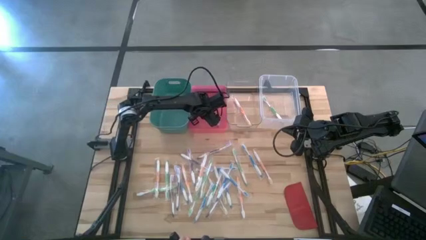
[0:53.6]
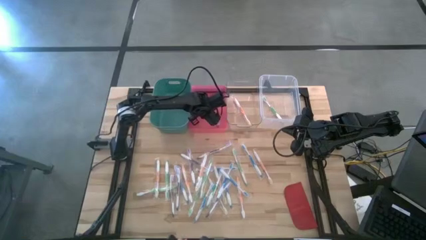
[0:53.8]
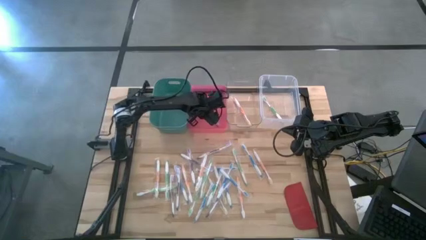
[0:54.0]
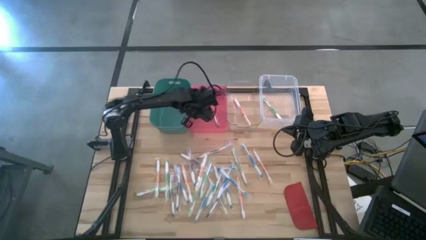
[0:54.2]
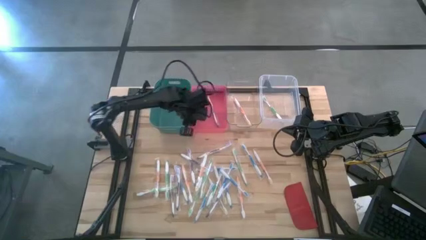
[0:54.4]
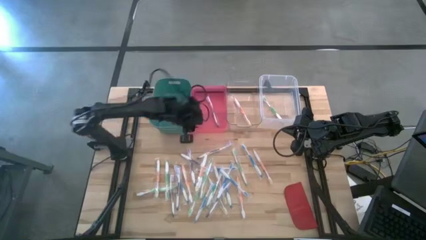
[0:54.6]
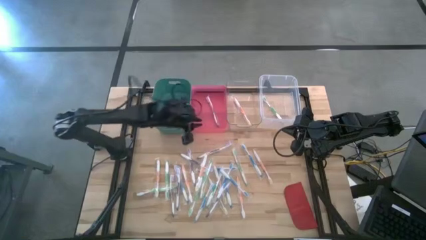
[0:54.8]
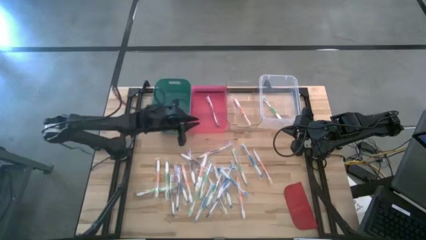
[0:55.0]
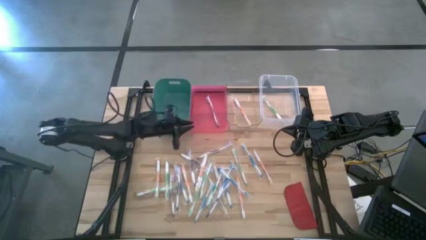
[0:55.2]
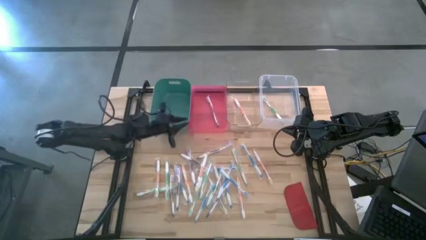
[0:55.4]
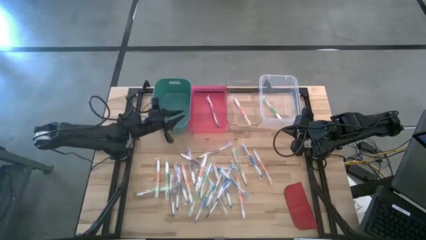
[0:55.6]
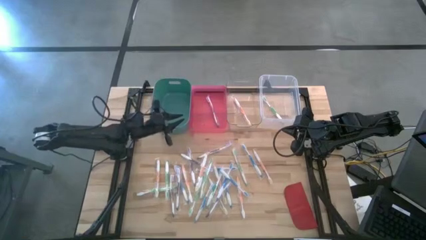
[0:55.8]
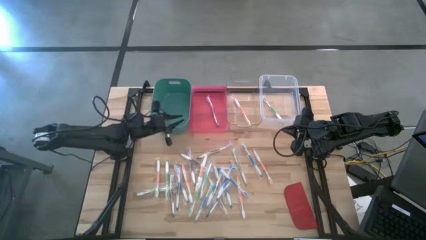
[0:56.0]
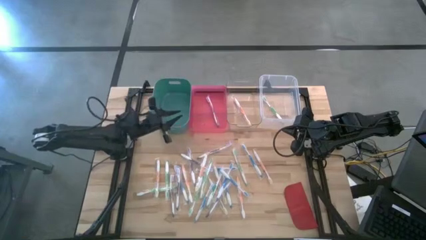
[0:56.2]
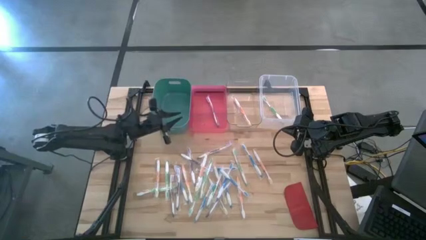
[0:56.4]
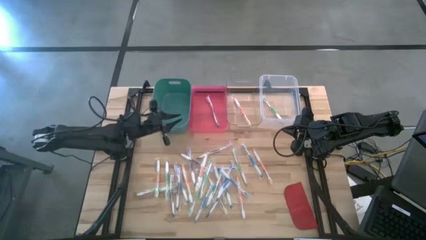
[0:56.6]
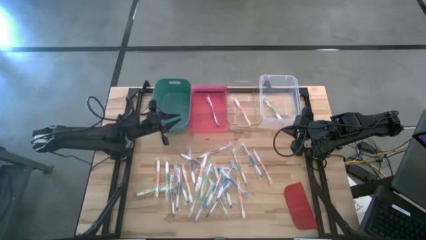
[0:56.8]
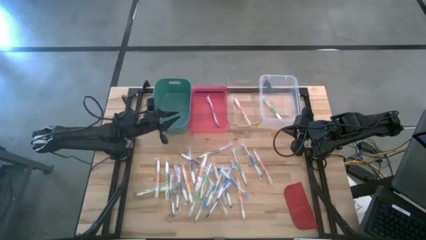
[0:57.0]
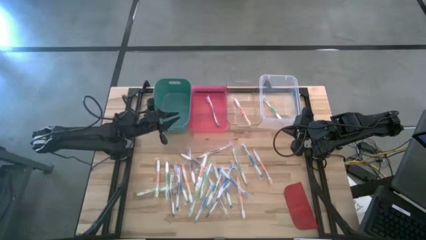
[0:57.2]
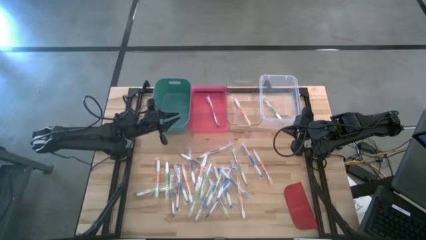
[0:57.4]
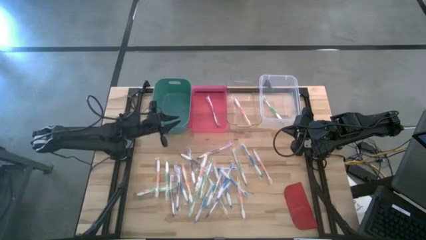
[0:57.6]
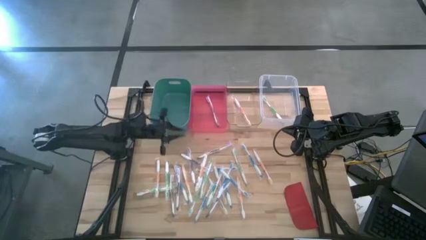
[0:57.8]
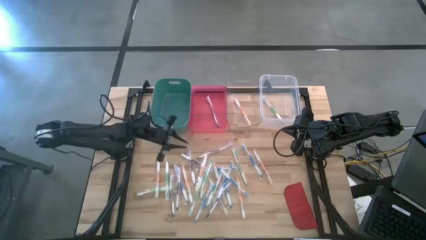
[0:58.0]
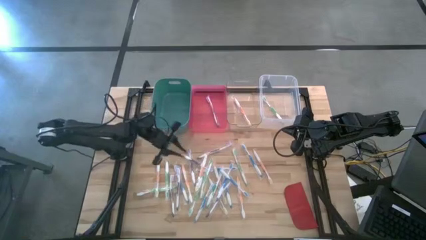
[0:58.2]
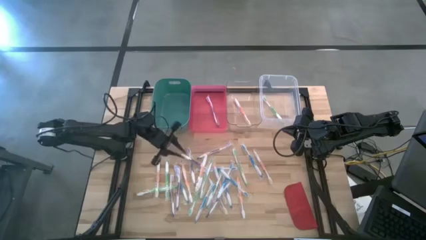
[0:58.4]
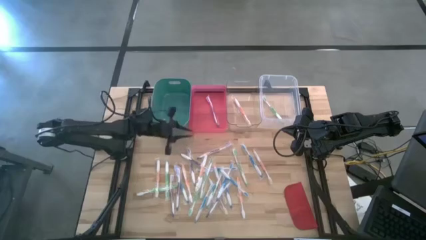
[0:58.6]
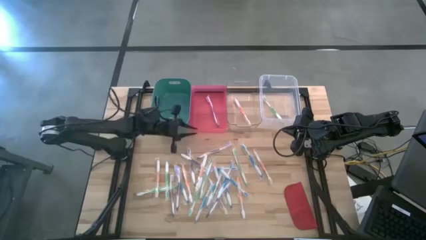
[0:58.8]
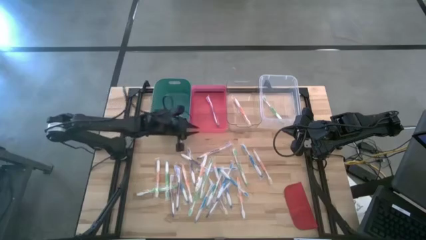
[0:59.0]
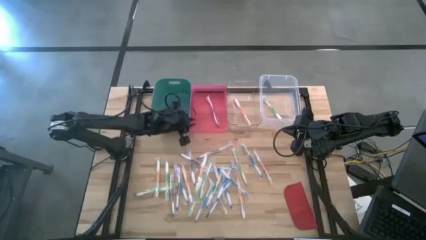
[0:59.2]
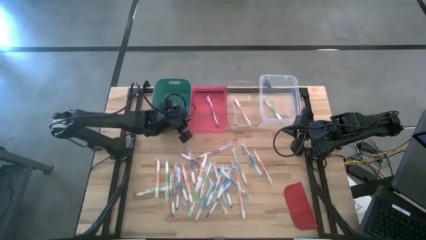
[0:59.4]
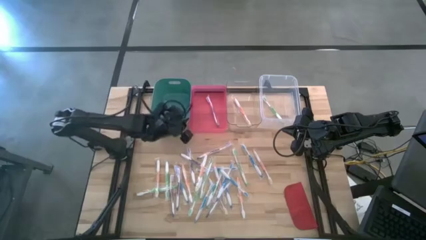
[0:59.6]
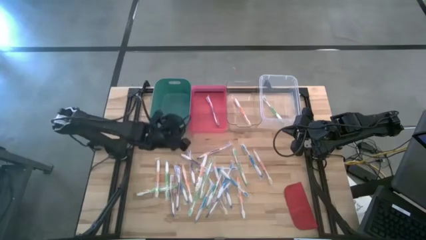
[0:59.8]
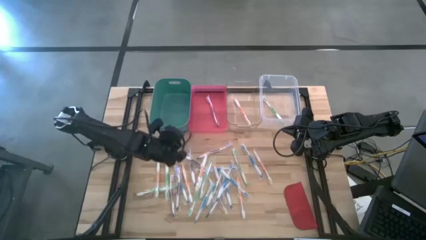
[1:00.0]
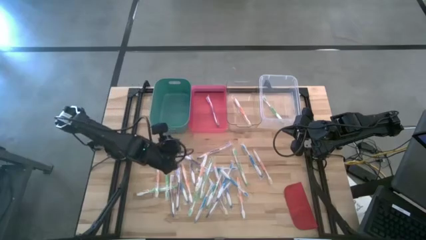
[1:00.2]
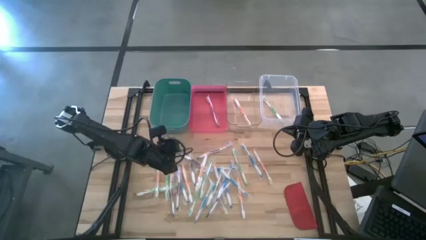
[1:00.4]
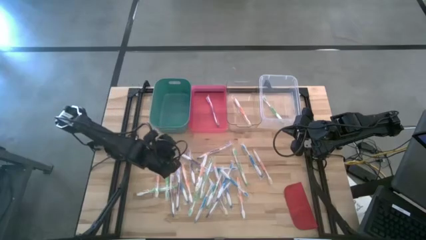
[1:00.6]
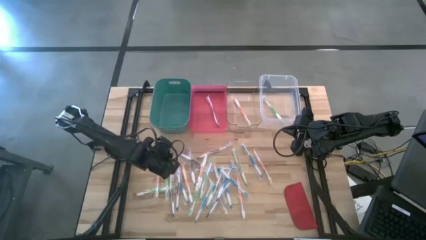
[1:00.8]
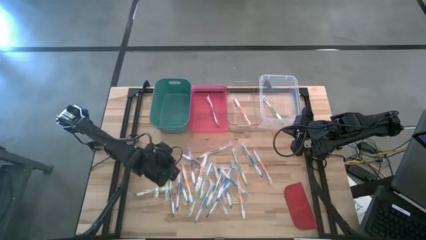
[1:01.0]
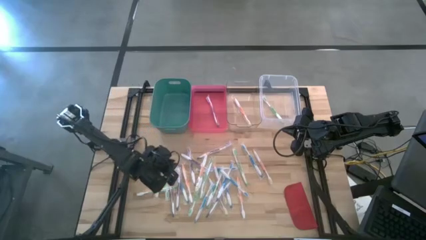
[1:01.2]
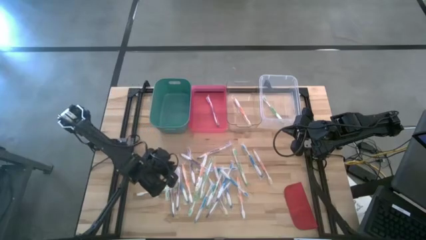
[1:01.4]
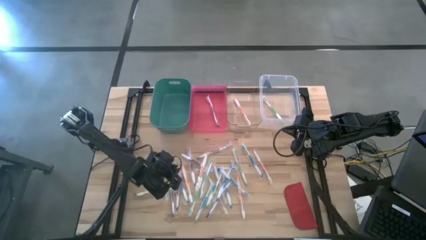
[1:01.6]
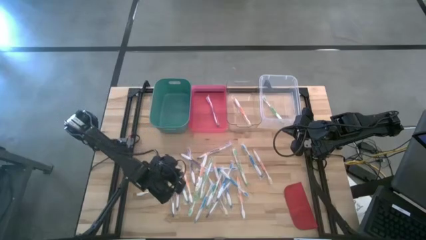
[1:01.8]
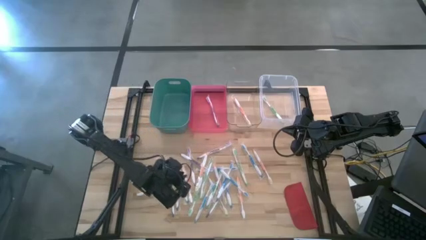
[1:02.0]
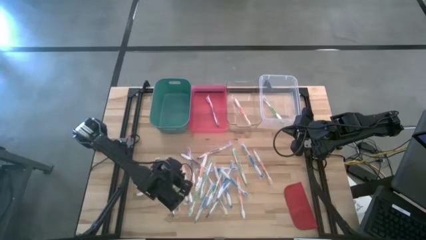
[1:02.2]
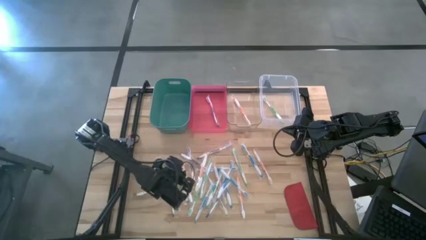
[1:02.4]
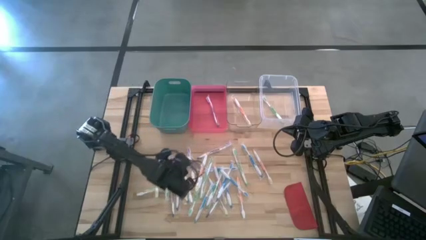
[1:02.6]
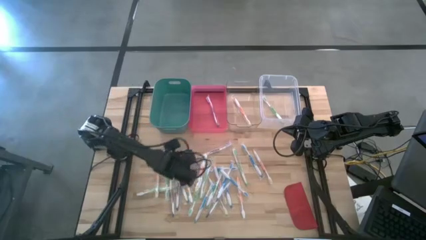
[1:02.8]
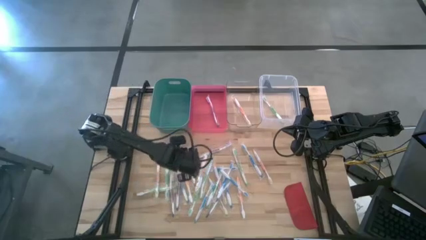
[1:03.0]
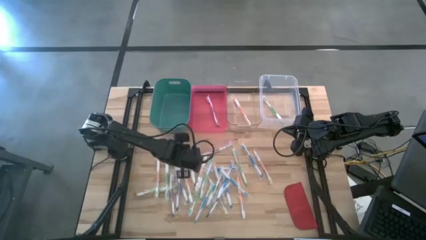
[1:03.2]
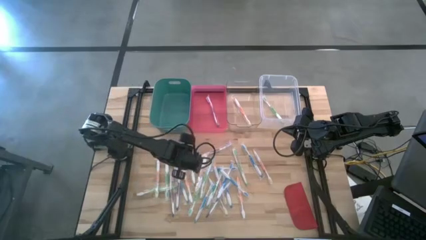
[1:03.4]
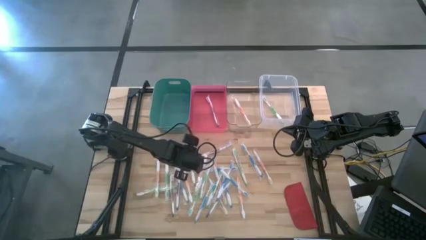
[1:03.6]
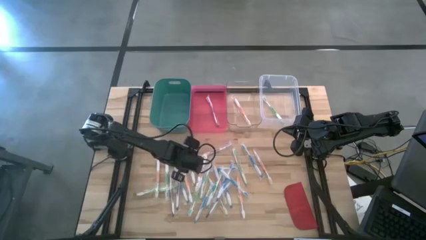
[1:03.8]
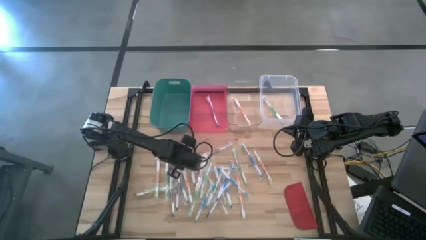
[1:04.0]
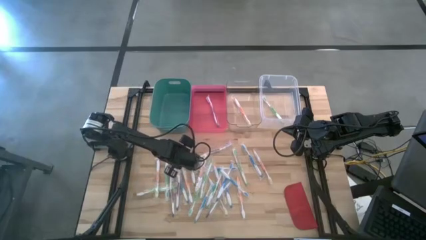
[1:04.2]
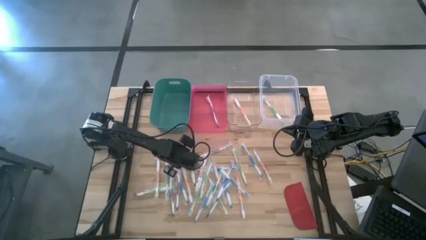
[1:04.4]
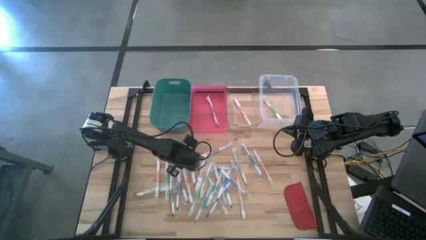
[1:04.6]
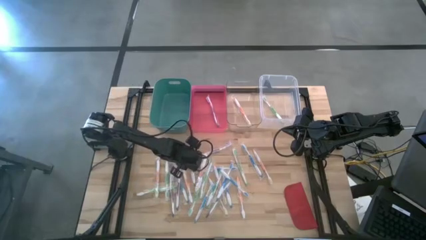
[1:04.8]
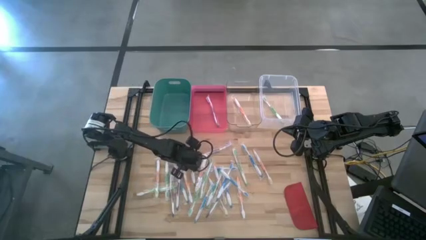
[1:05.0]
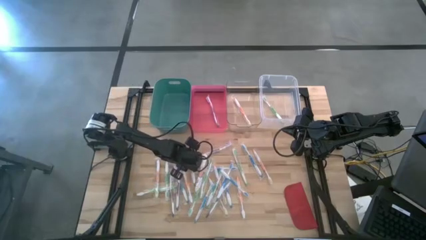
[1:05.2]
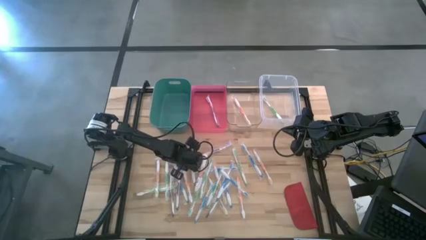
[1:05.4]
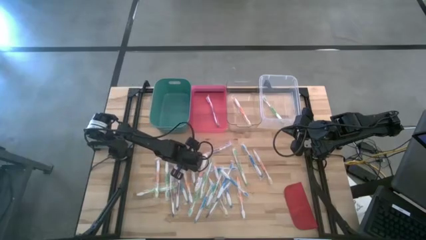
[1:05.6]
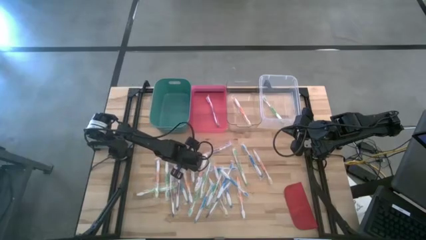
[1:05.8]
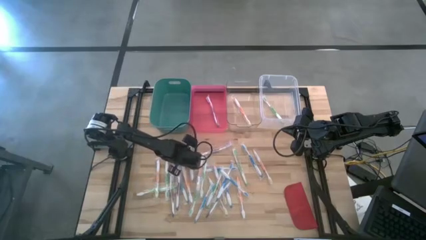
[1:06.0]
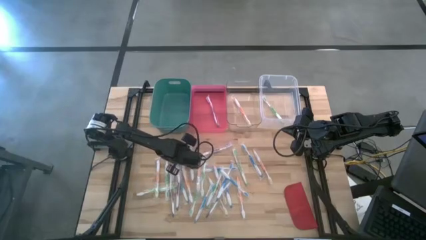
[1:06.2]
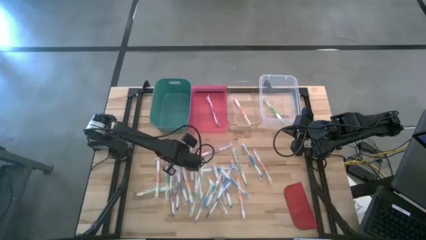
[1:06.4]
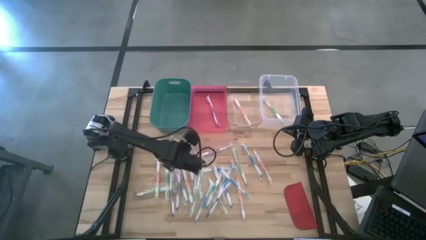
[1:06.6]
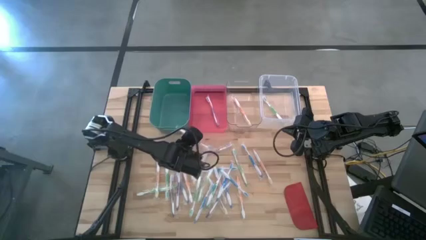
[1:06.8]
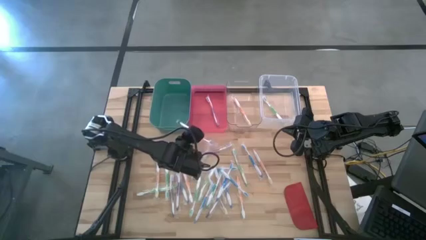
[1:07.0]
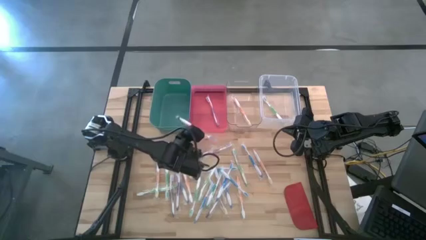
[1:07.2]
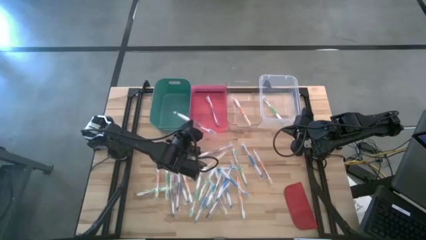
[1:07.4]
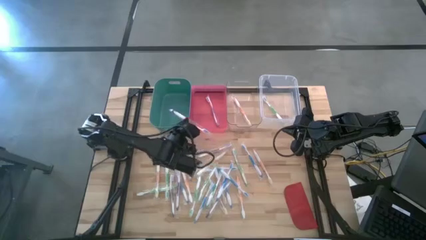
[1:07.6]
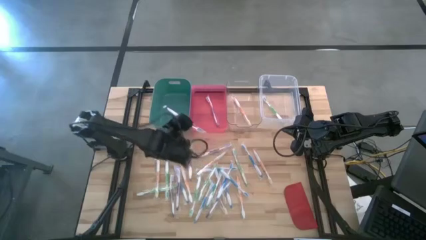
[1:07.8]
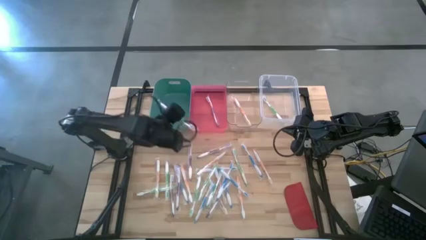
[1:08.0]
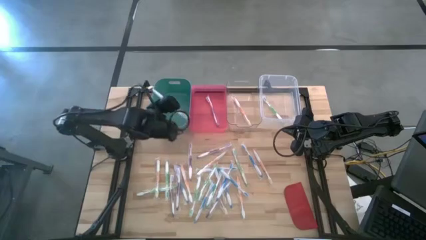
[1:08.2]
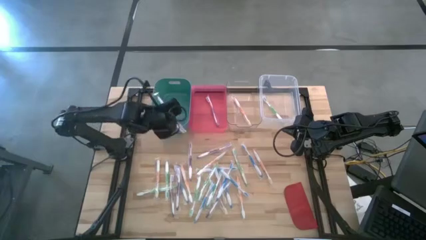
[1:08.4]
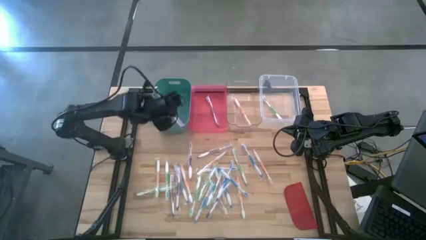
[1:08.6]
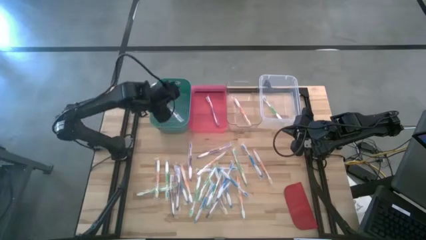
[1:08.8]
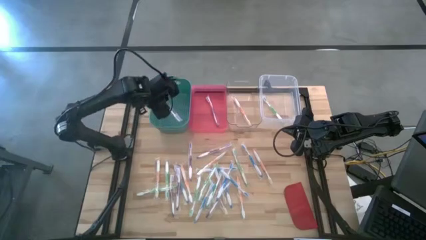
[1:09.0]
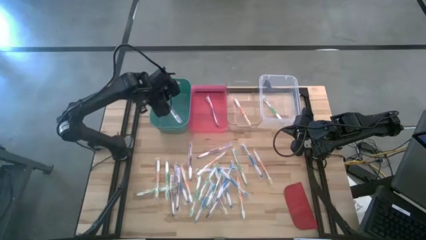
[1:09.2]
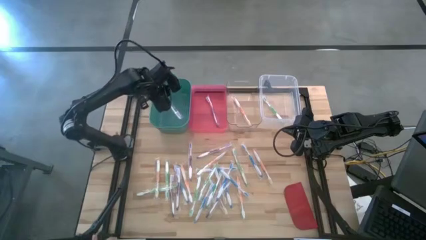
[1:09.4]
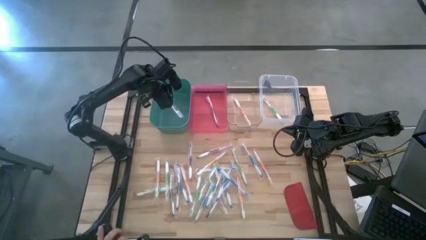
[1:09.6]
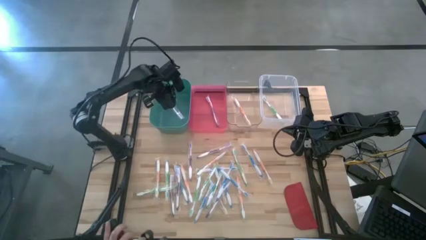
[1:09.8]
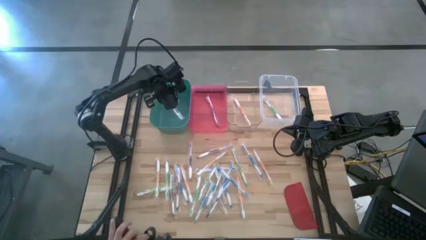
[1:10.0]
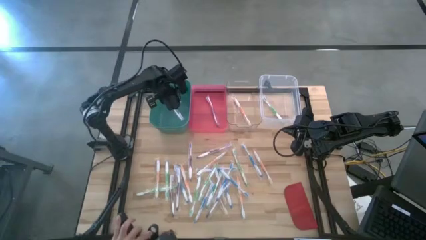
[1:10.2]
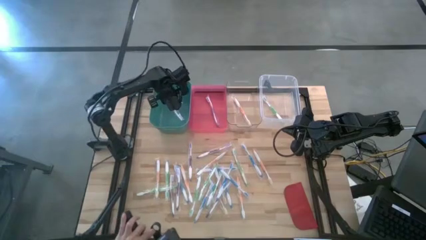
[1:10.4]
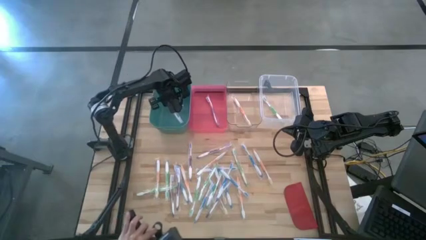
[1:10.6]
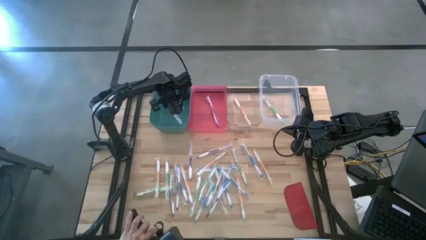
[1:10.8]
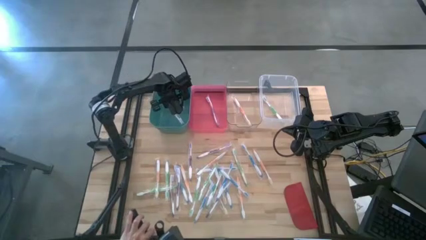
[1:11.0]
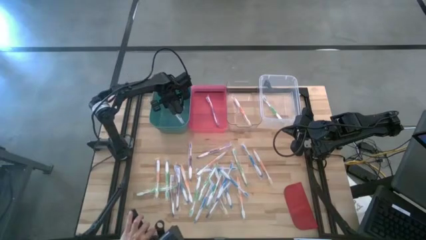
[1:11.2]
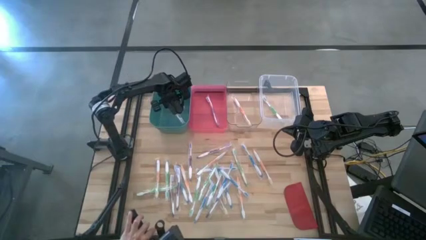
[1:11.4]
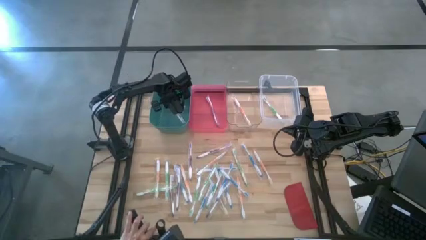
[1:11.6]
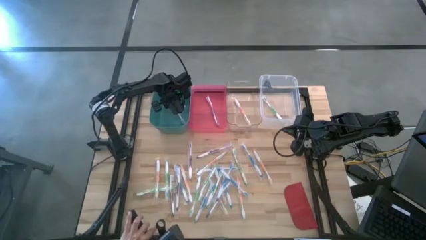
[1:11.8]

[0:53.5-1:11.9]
Task: Pick & Place Toothbrushes
Put the violet toothbrush into the green bin
